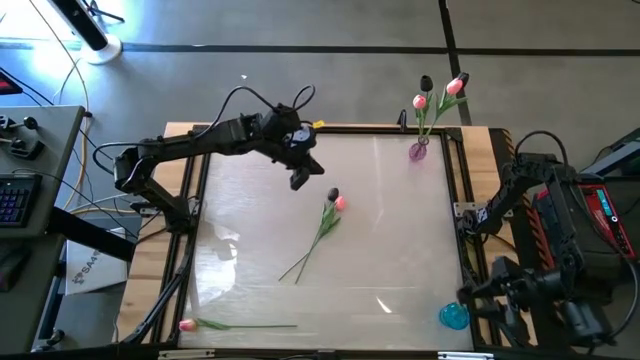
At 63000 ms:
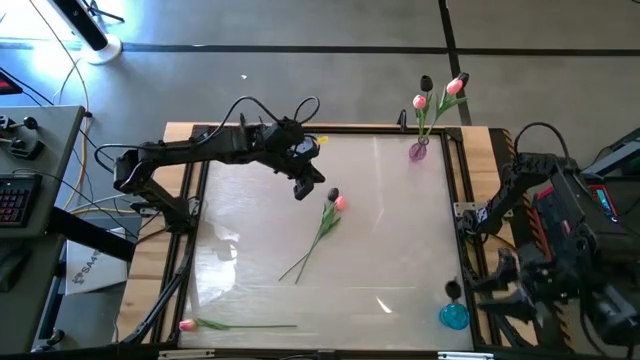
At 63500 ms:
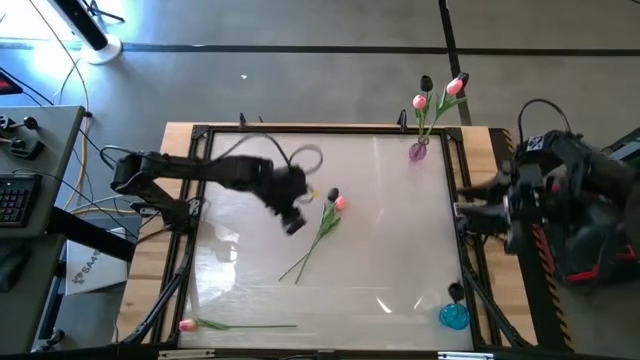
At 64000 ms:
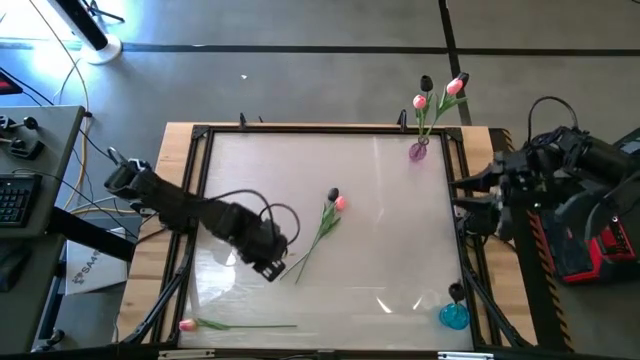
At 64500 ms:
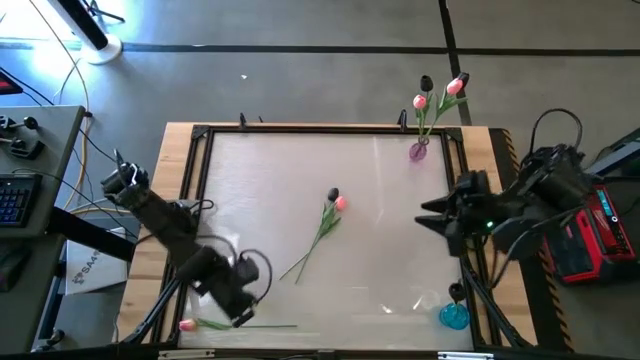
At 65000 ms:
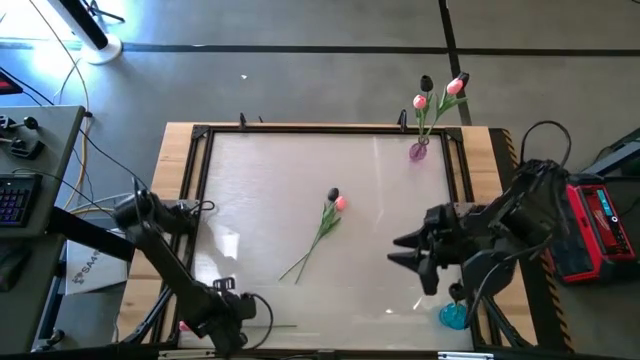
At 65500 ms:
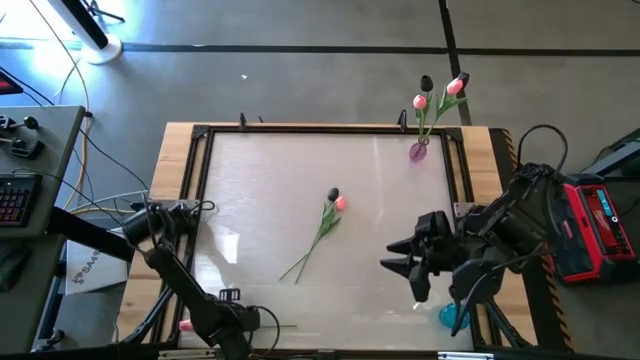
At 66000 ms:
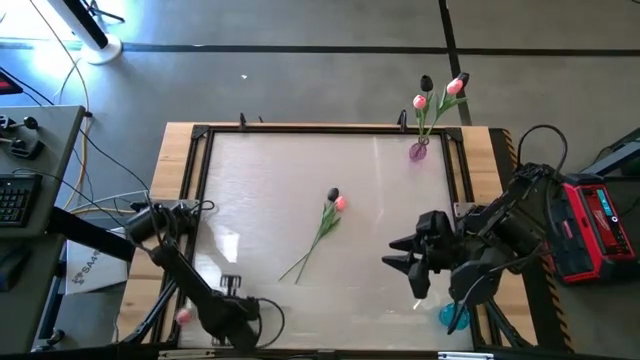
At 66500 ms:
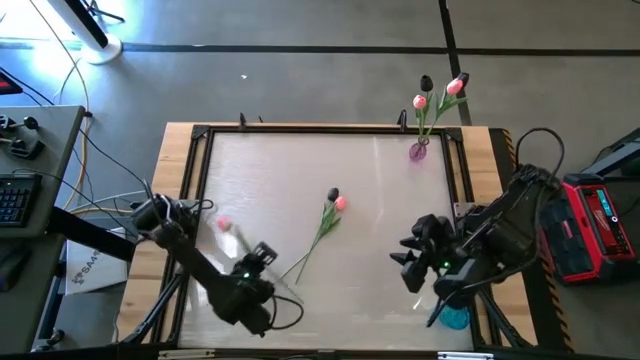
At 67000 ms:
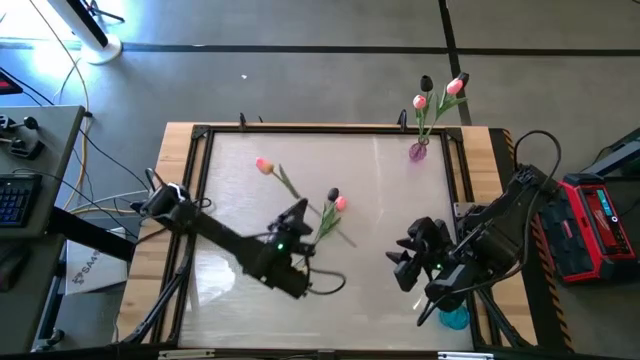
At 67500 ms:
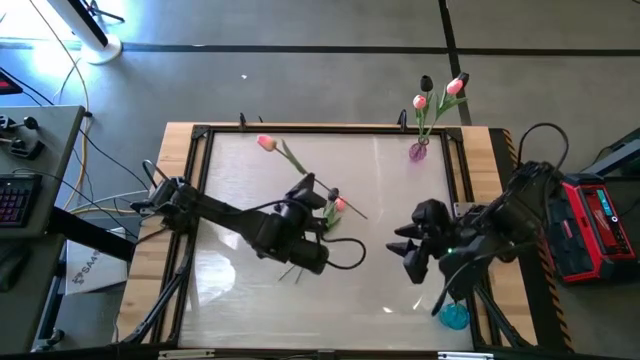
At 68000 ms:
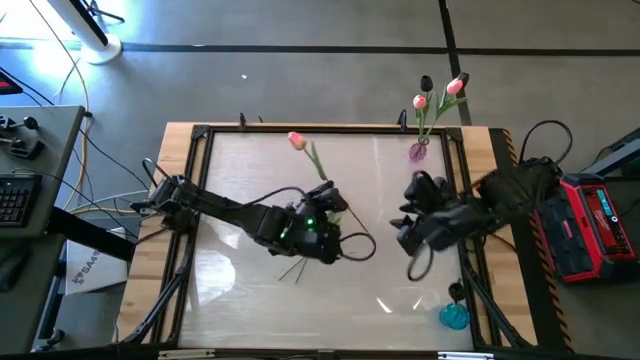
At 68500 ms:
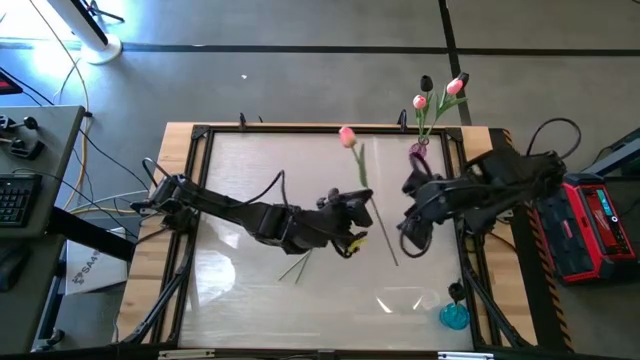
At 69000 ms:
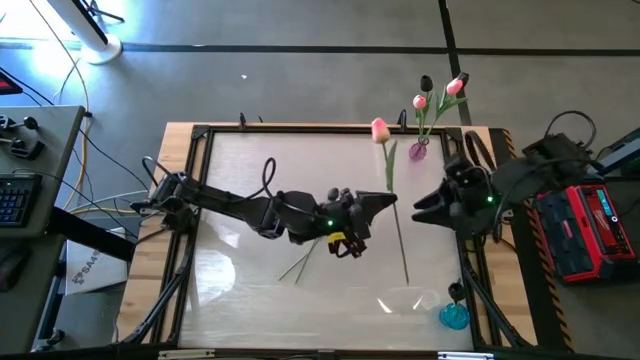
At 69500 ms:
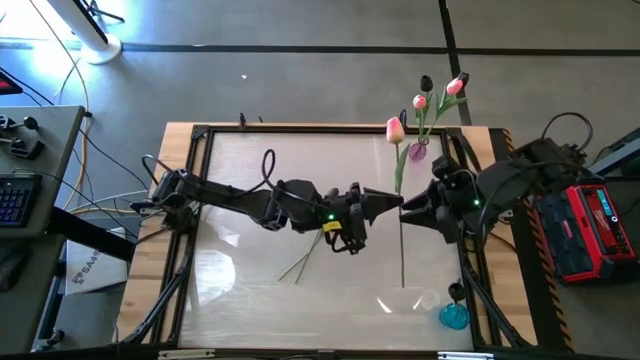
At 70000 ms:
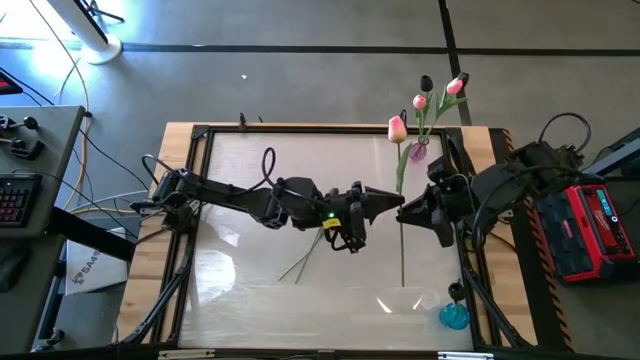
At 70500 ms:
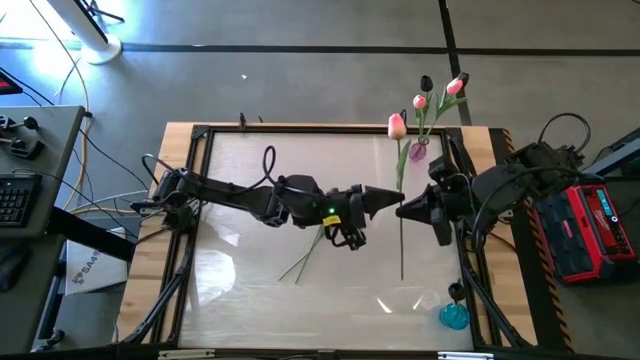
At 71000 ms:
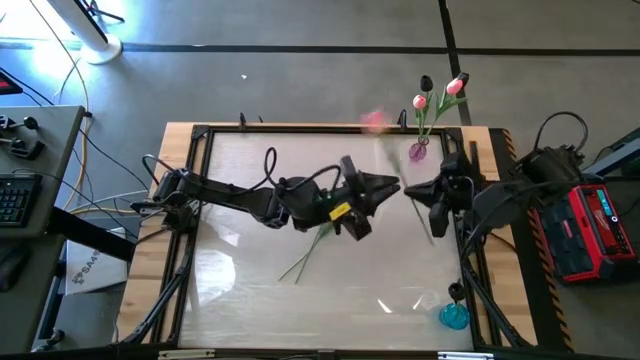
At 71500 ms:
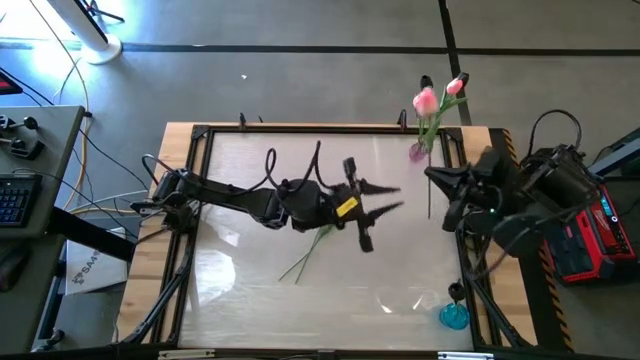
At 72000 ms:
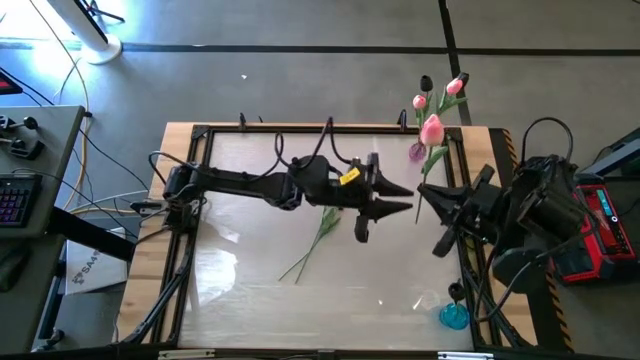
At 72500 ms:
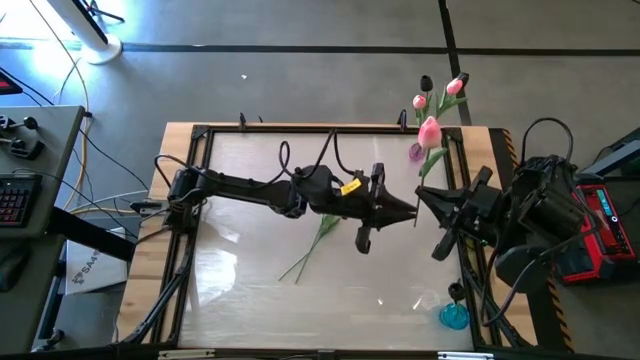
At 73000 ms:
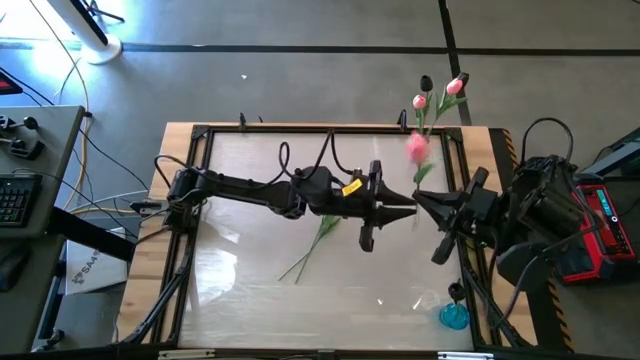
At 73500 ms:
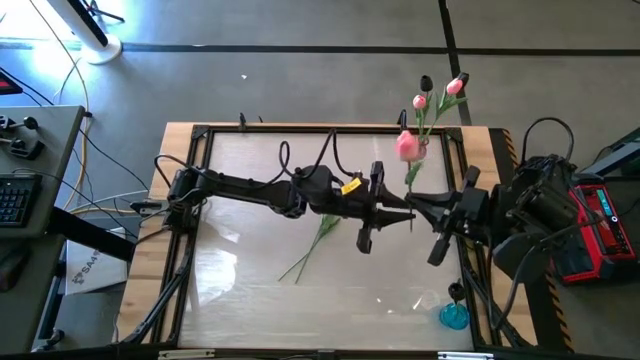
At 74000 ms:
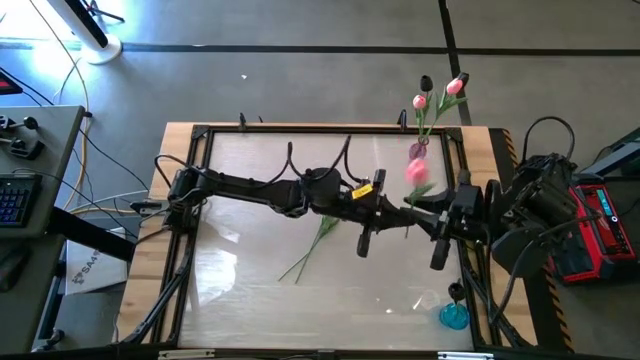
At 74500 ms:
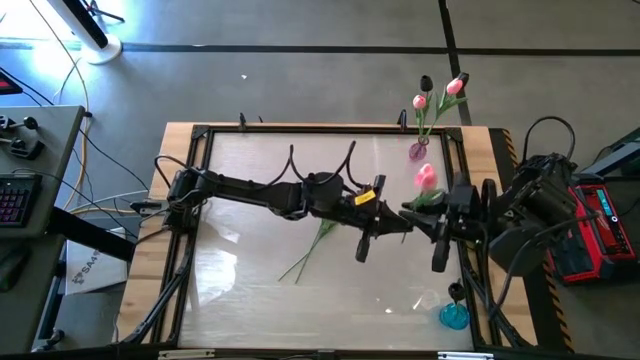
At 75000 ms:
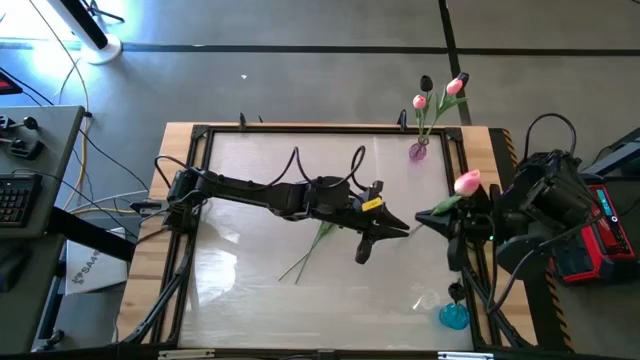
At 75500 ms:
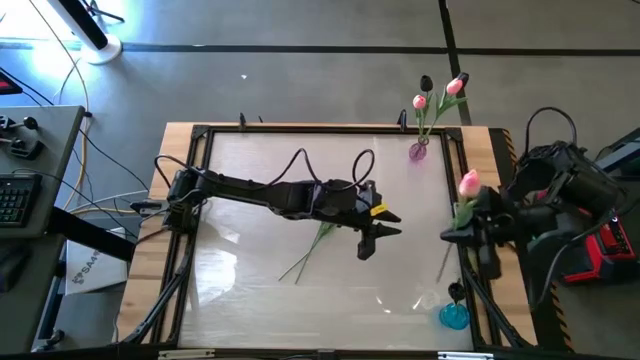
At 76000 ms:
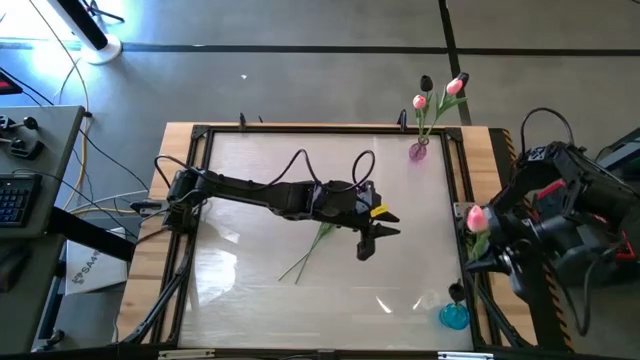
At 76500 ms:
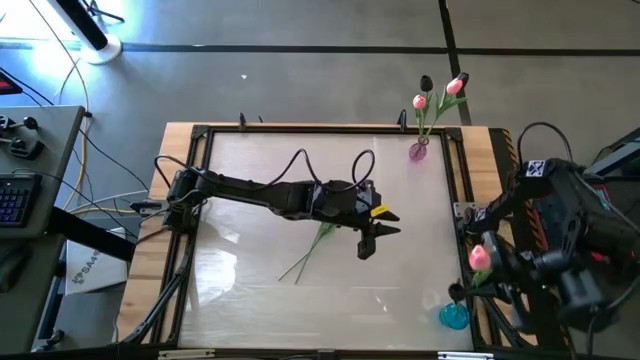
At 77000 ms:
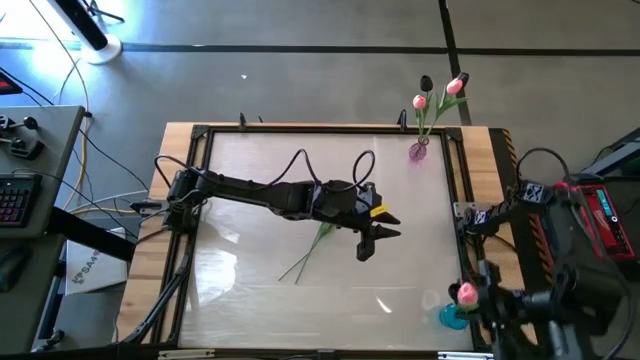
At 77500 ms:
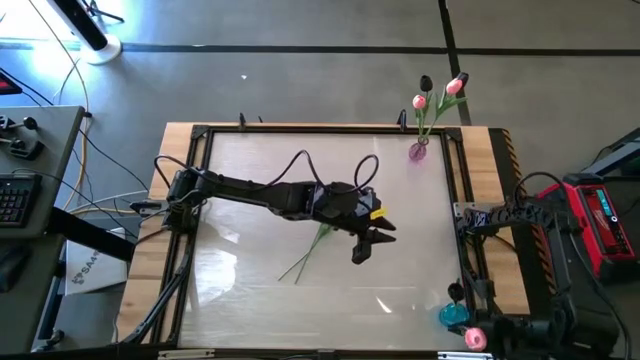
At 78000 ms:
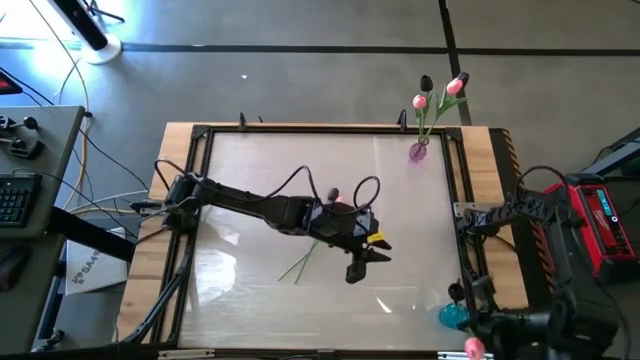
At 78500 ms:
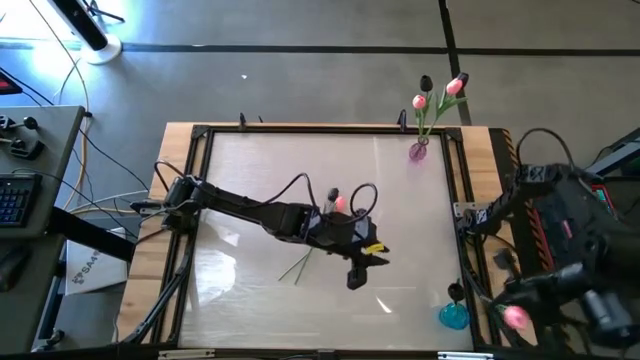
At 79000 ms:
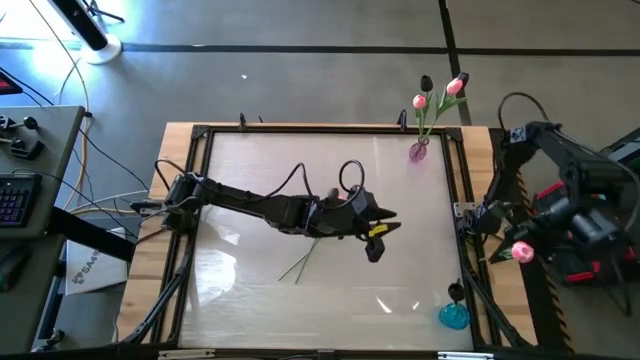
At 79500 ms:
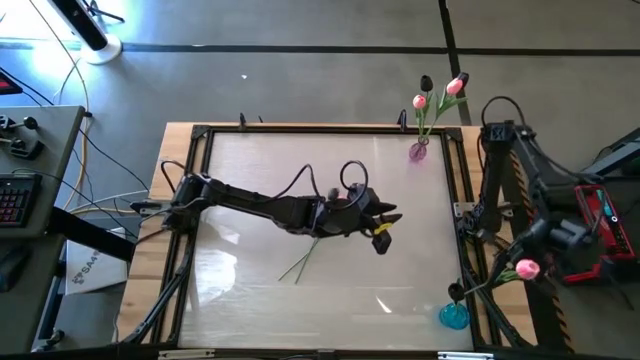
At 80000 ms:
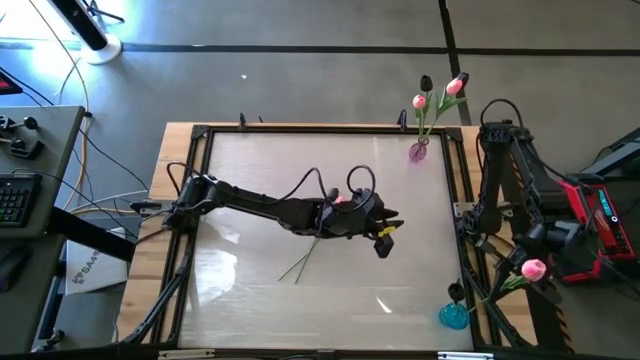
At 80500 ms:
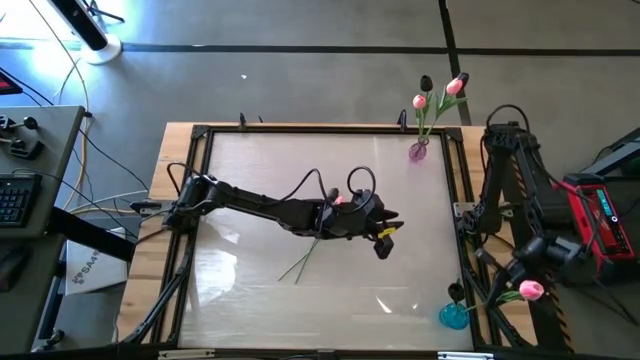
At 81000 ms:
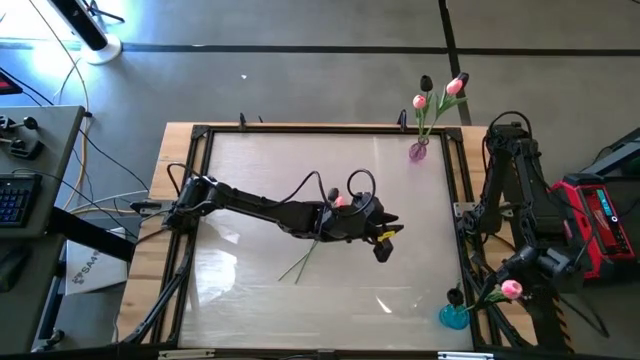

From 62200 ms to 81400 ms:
Task: Sort flowers into vase by color
Put the bottom pink flower into the blue vase

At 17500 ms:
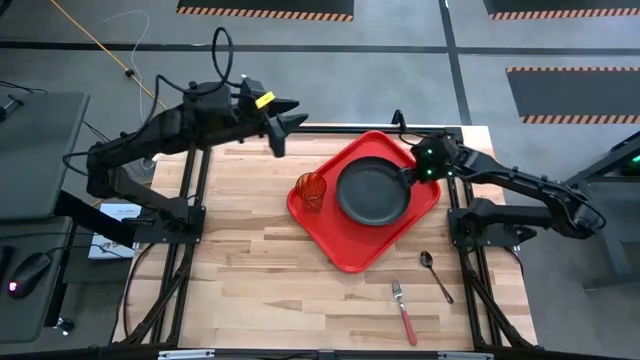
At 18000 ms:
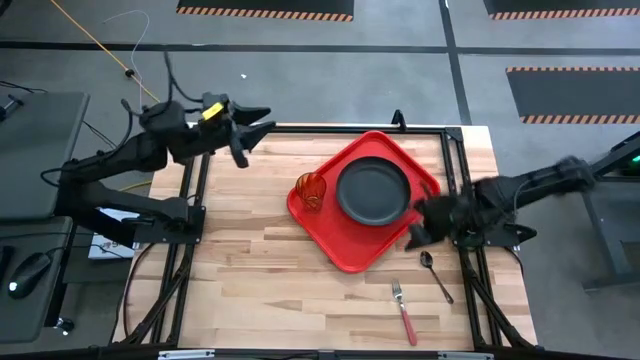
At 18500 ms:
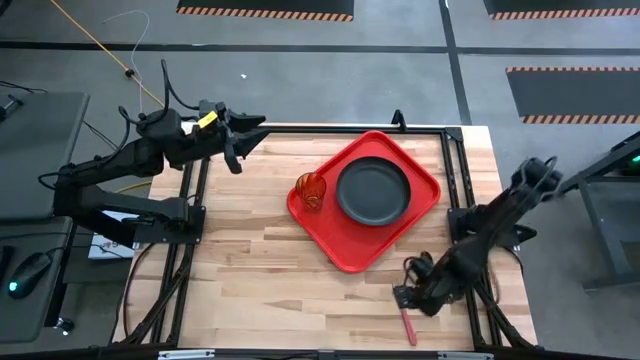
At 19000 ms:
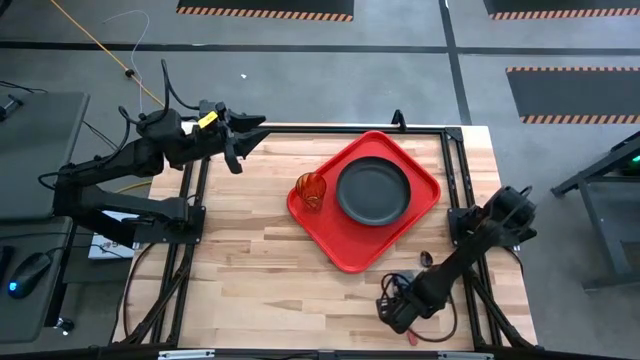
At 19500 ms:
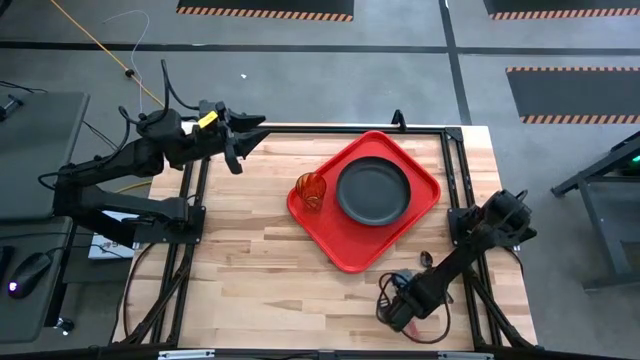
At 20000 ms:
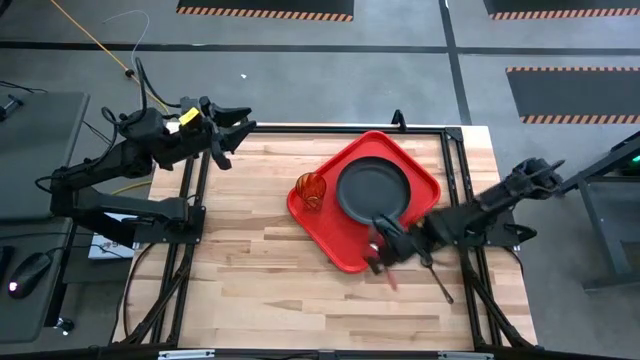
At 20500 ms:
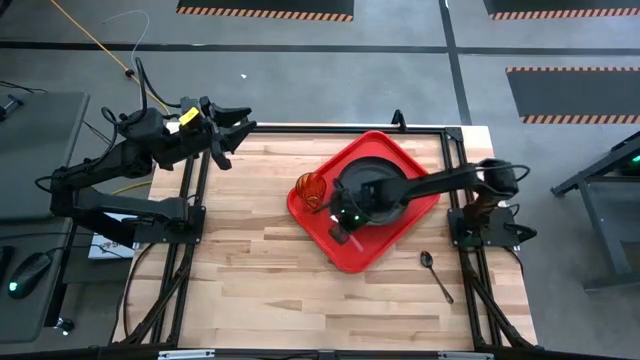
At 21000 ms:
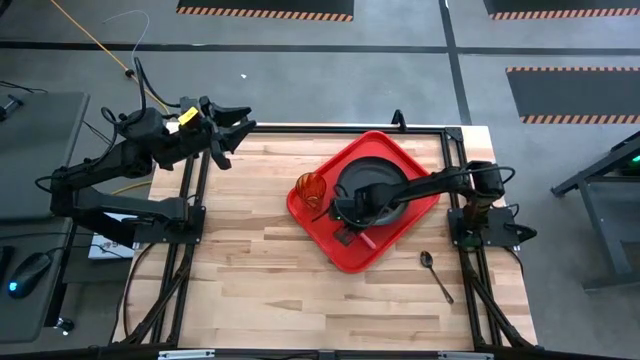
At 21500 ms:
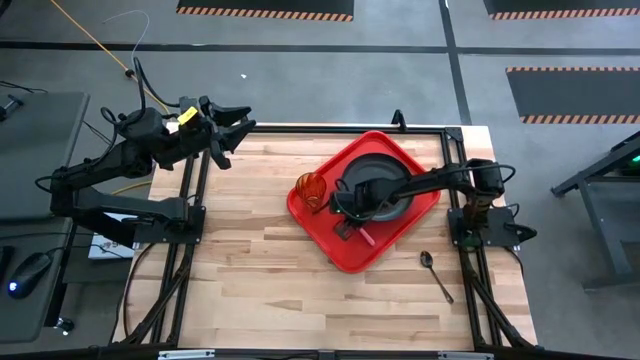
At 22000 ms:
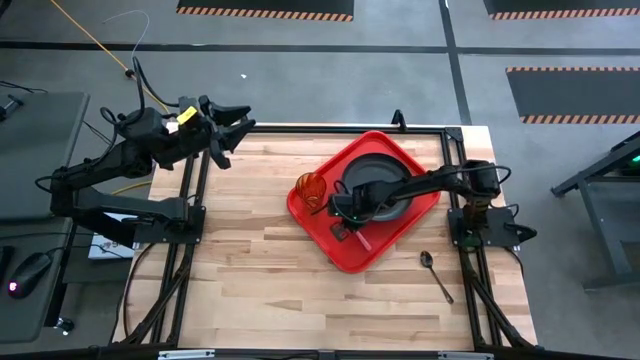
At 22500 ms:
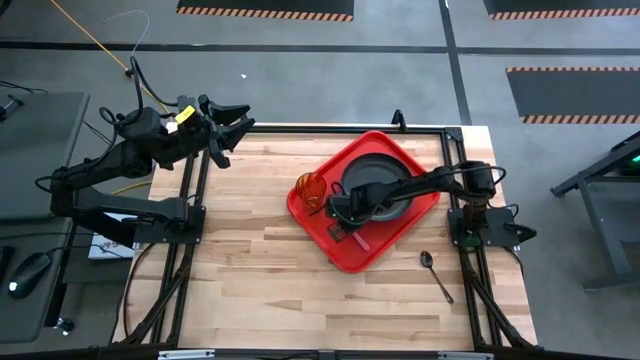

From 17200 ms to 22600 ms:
Task: Pick and place plate/cup/fork/spoon on tray
Put the pink fork on the orange serving tray to the left of the black plate
